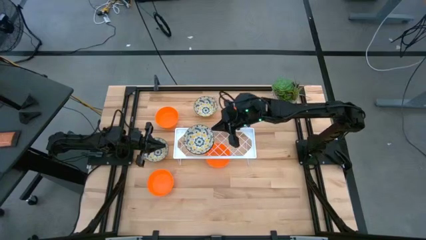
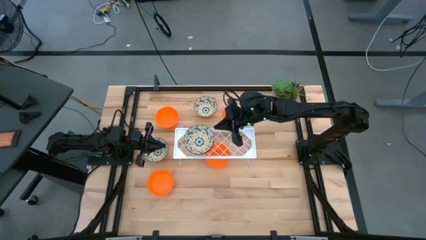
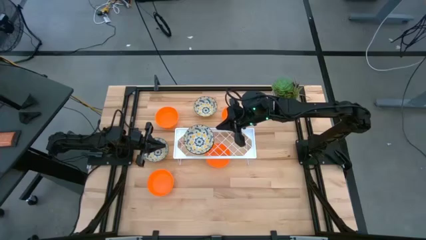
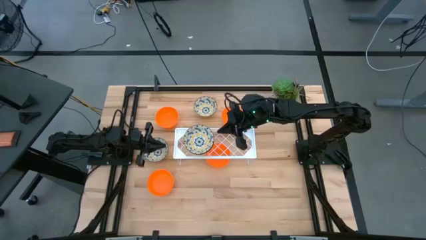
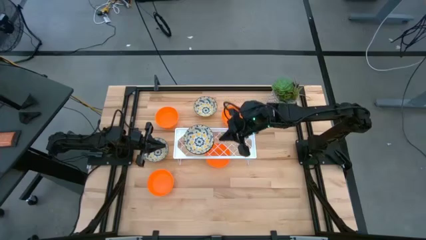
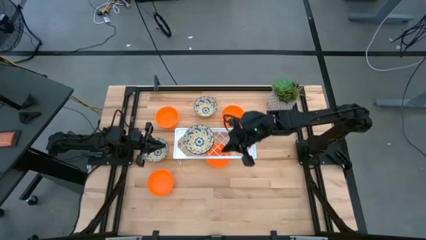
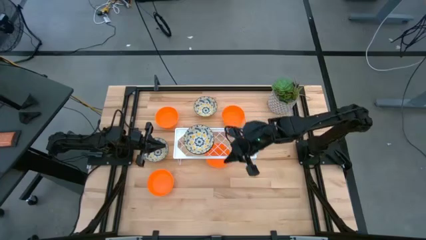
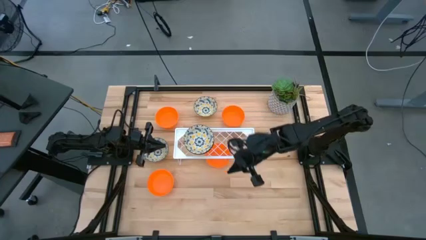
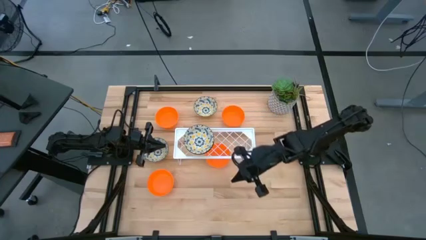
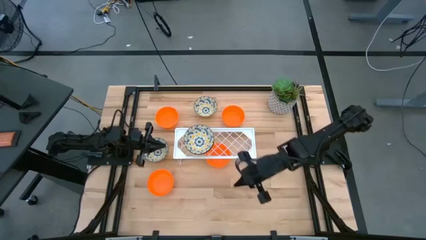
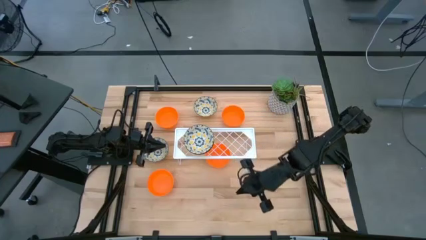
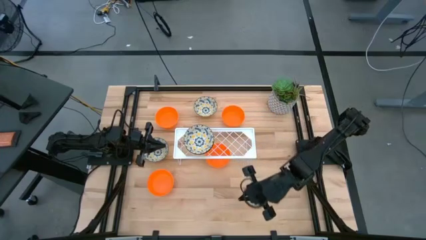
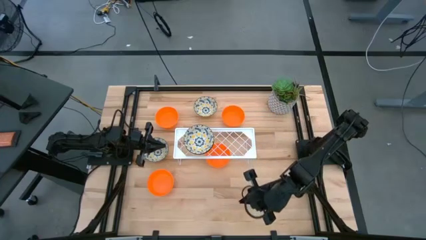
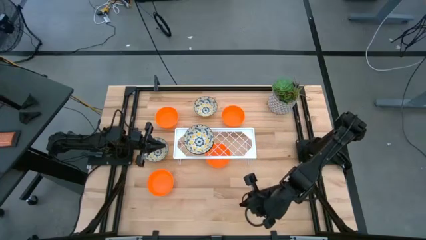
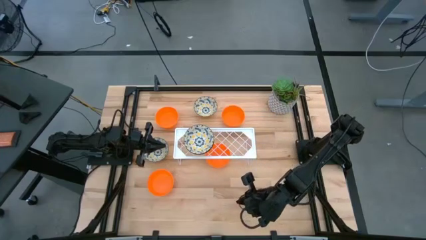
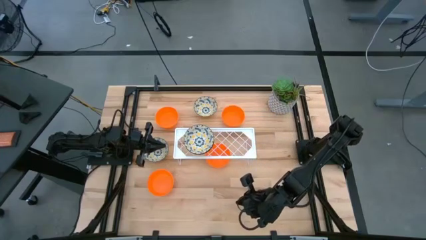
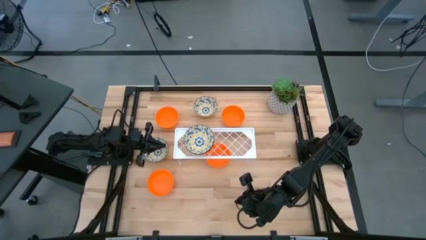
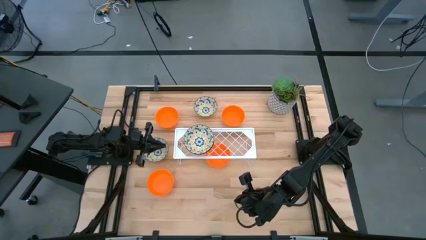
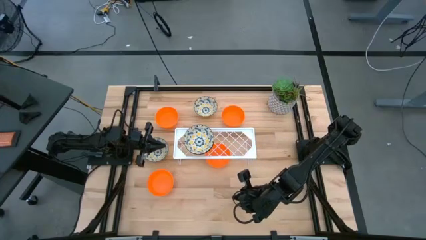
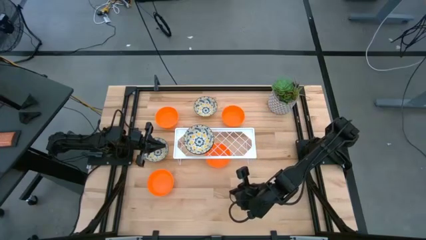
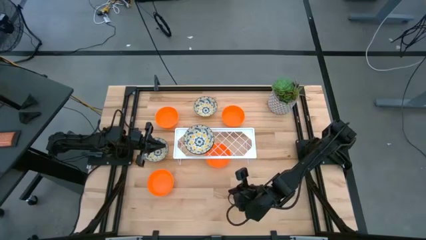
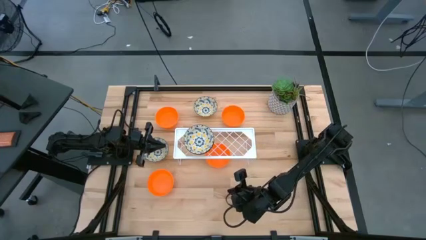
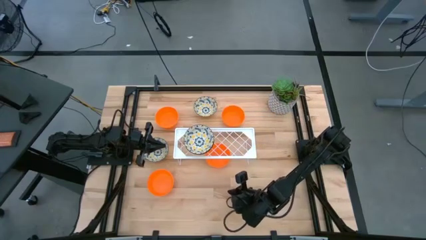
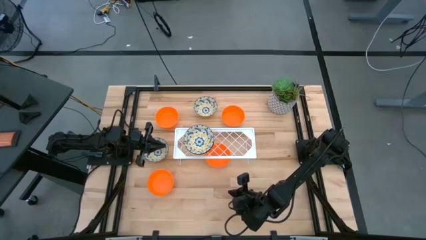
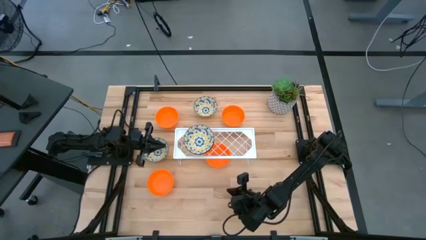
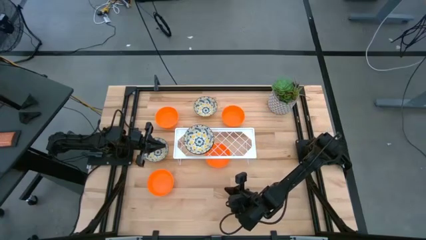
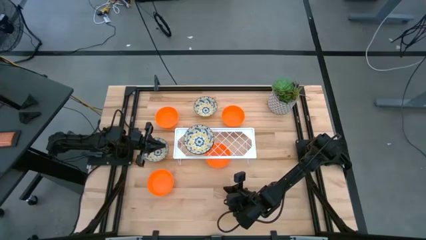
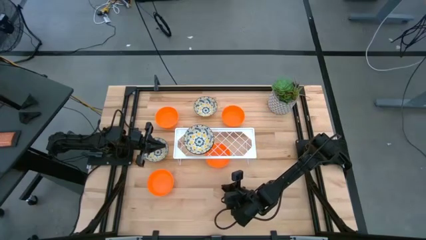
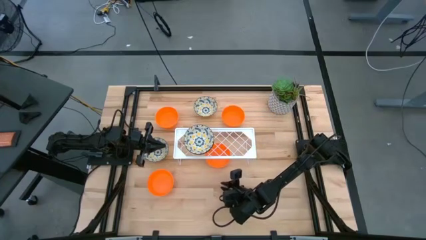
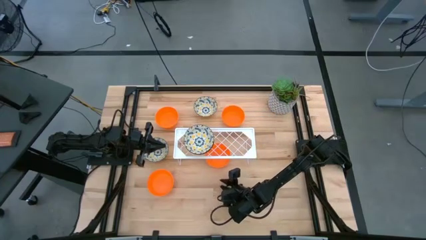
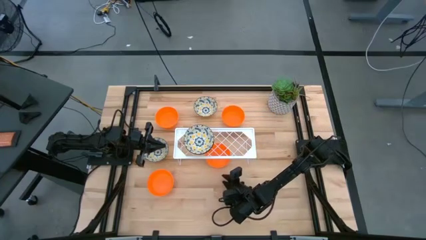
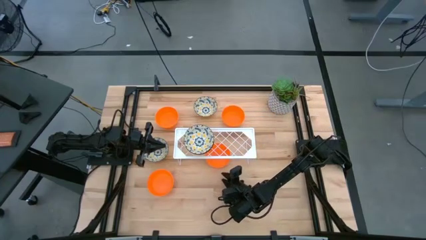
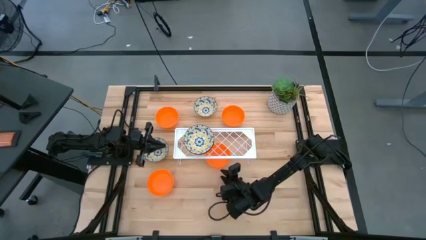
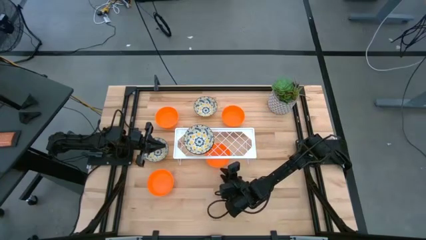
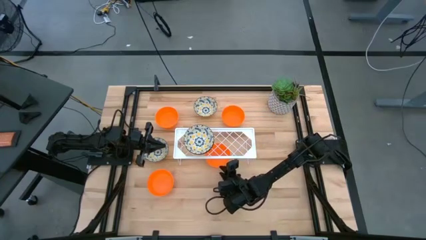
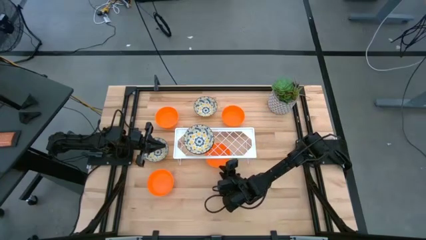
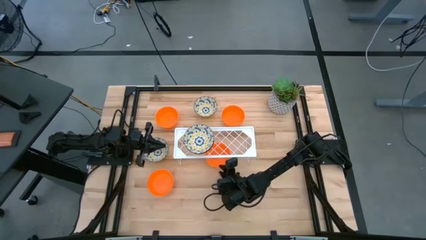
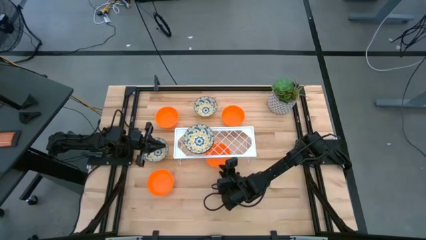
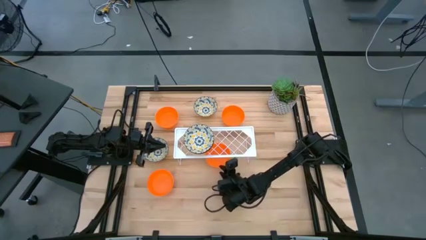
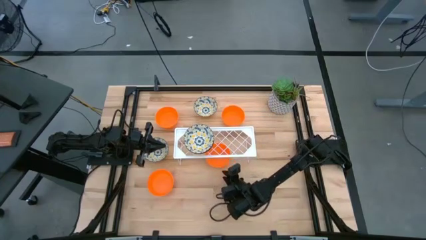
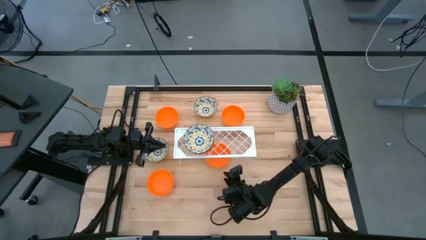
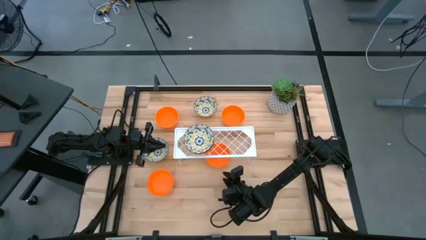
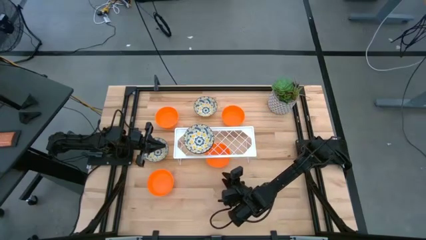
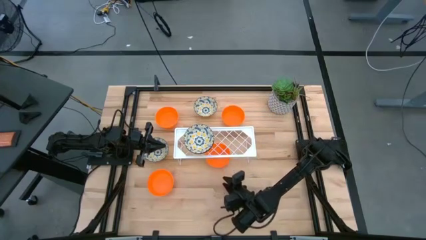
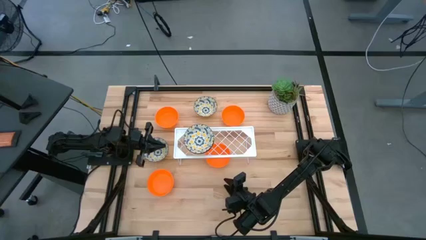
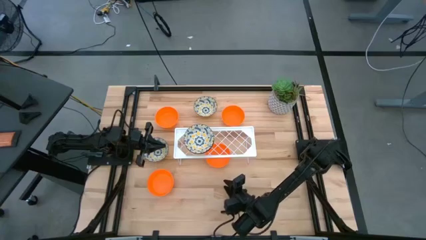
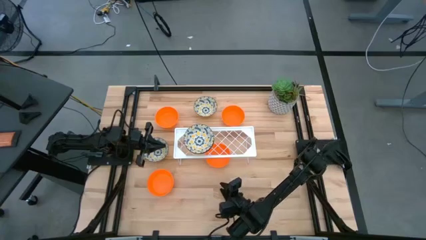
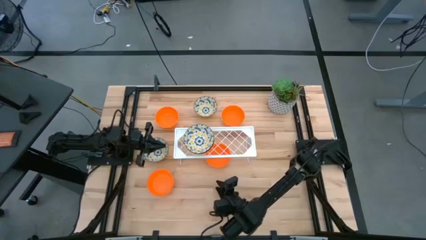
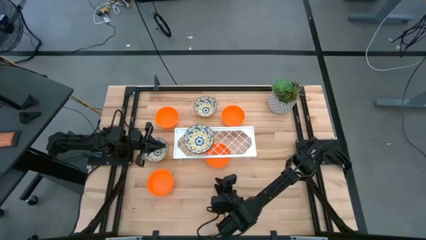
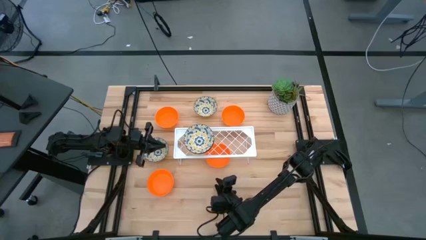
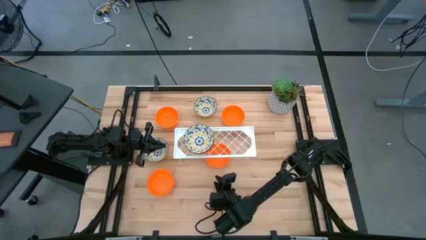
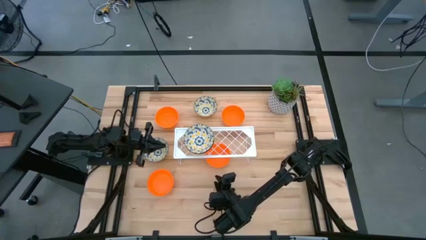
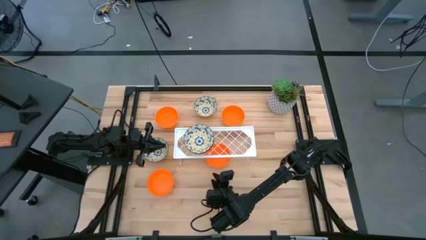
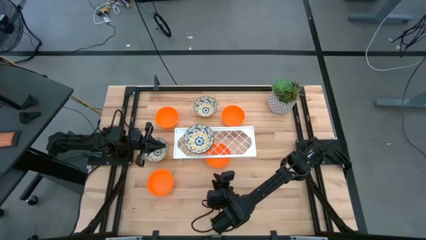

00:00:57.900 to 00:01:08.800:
Task: Pick & Place Mini bowls
Put the orange bowl on the shelf

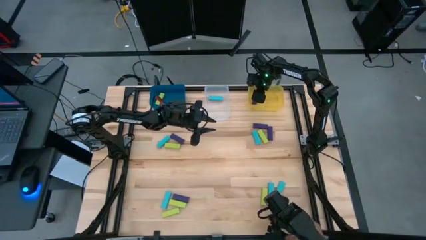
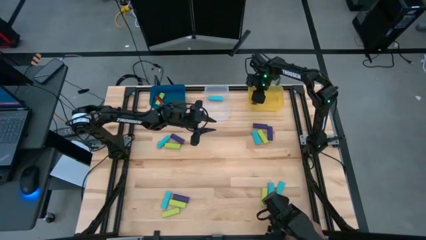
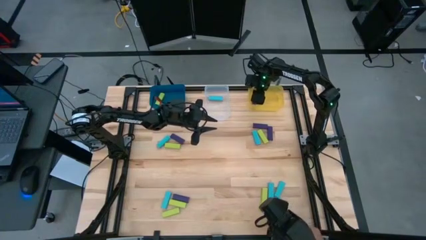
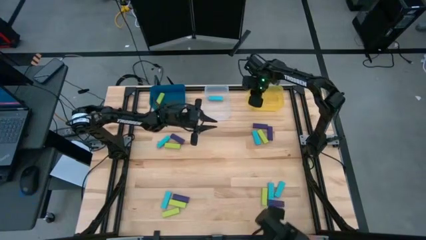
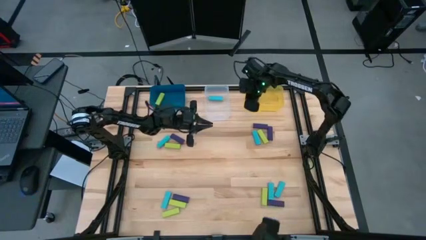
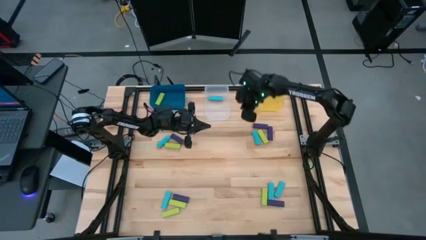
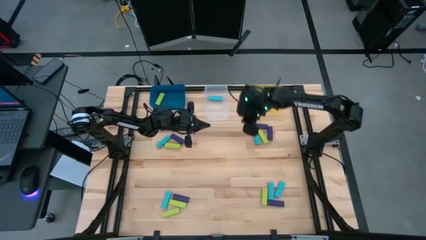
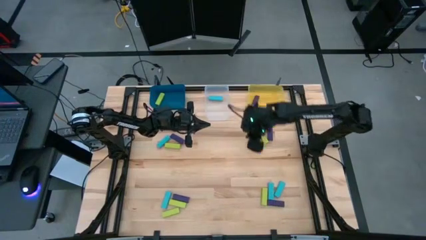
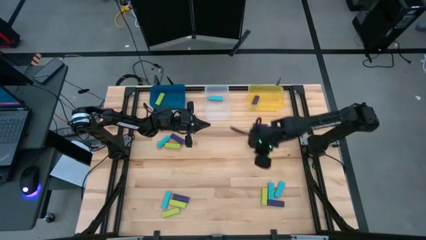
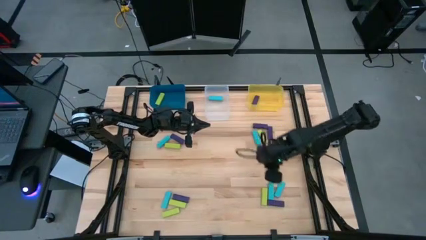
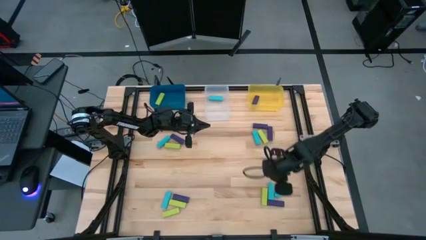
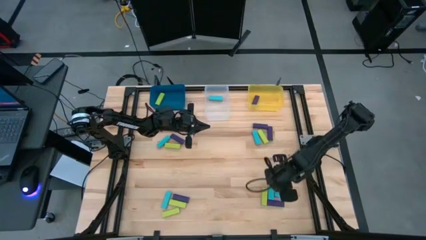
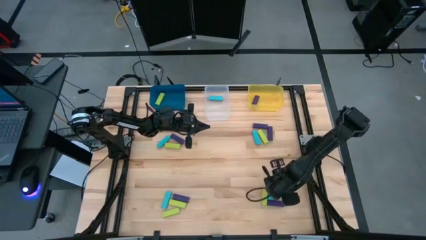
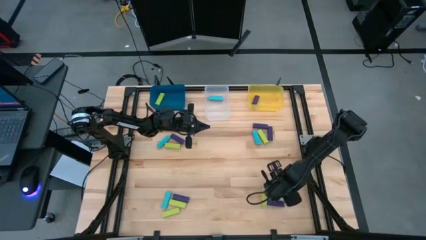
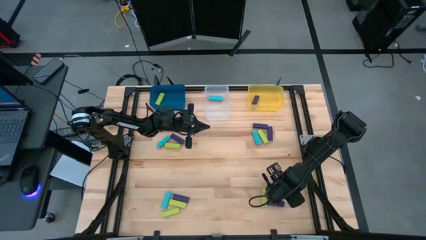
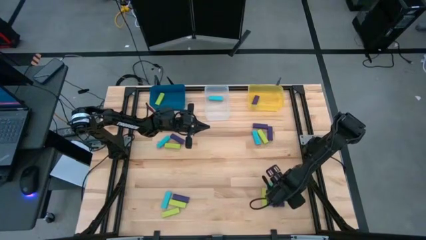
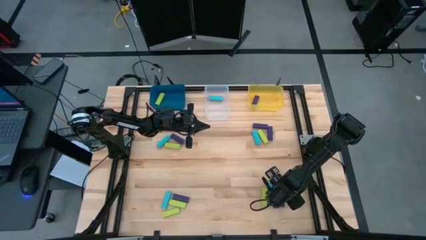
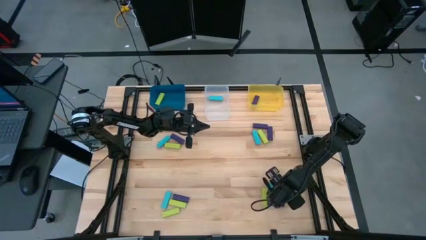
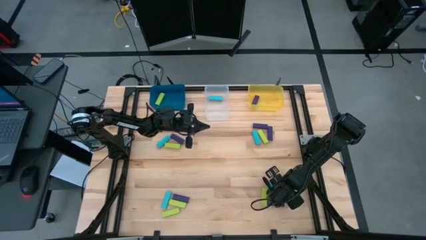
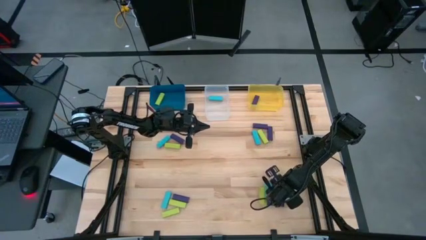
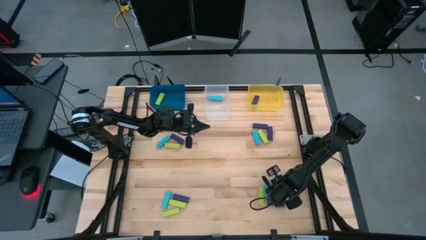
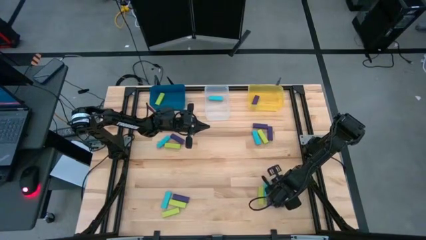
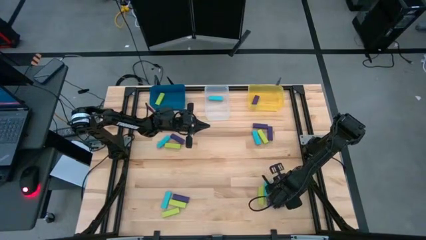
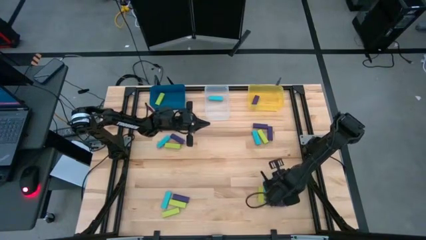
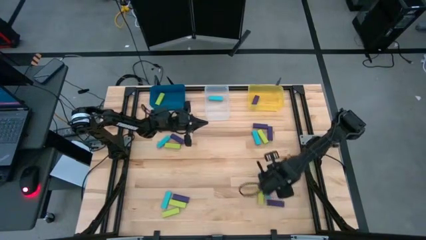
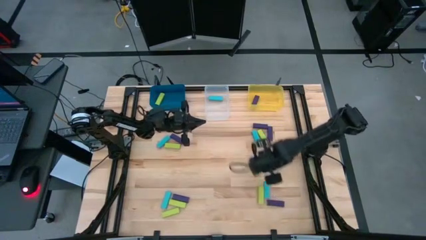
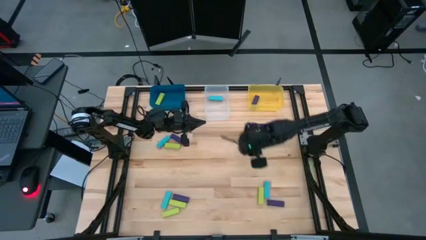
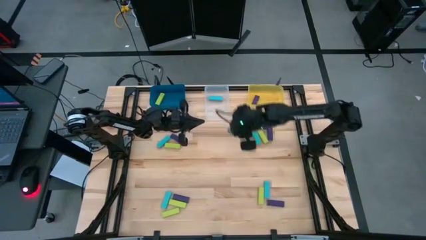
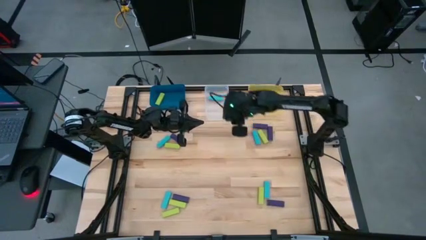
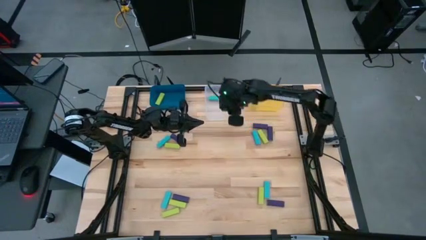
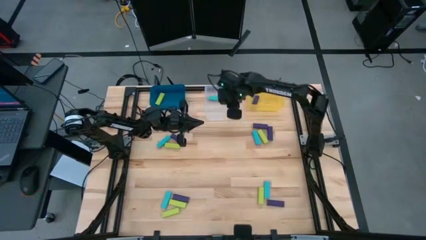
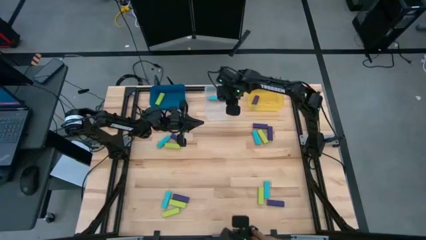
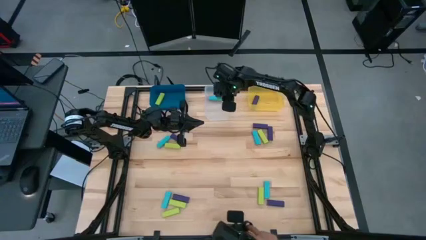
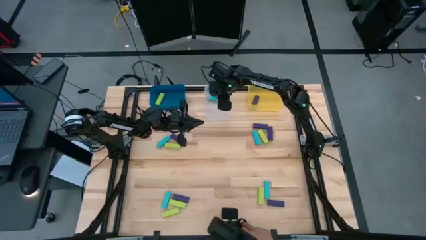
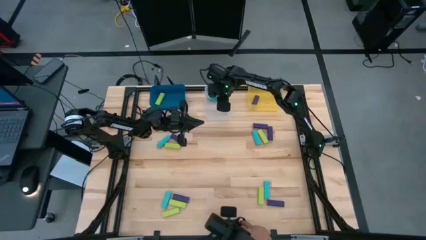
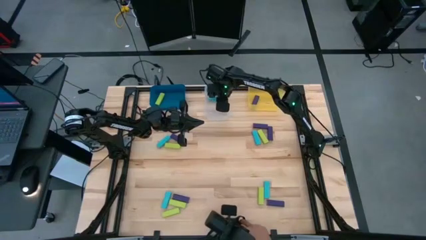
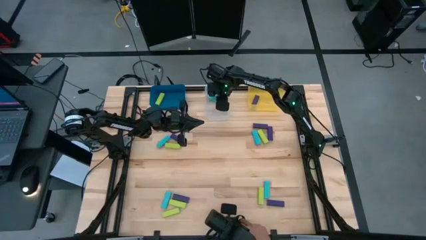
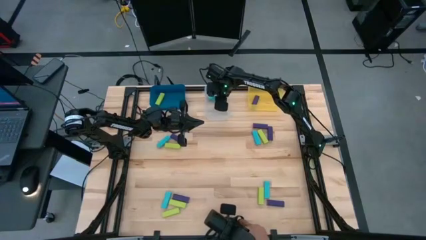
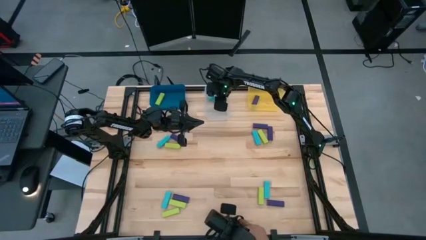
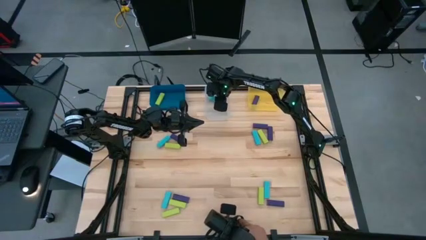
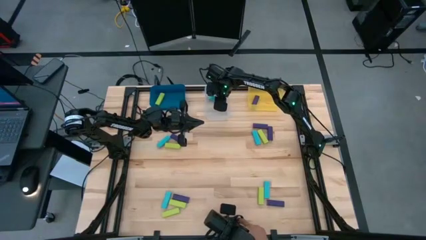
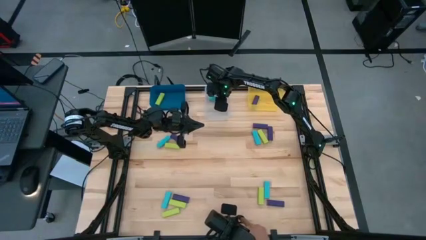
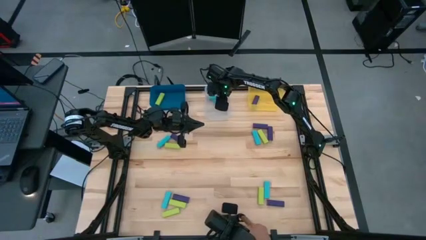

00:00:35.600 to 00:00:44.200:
Task: Sort blocks
Put the blue block into the transparent bin
